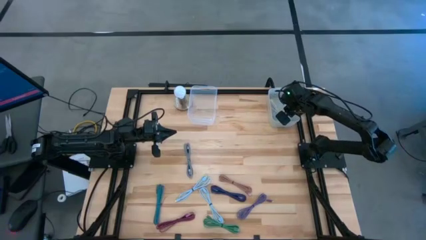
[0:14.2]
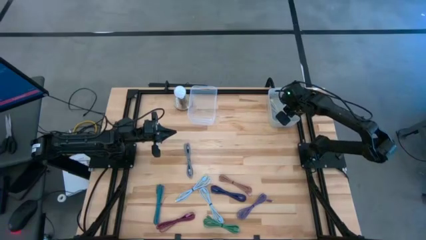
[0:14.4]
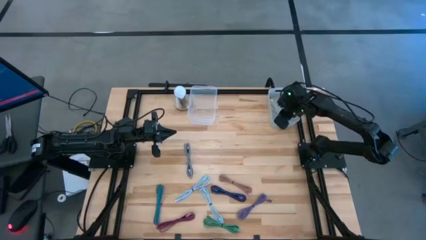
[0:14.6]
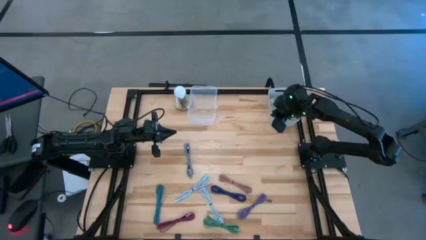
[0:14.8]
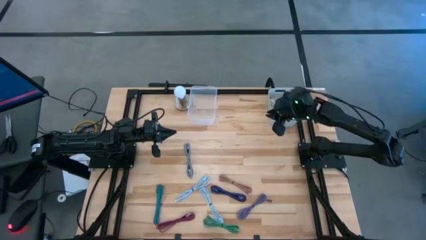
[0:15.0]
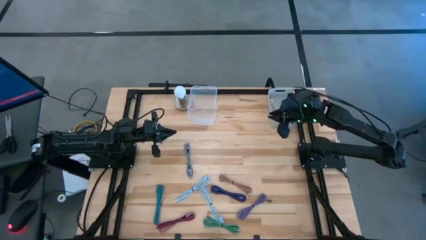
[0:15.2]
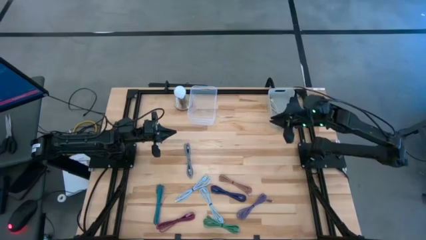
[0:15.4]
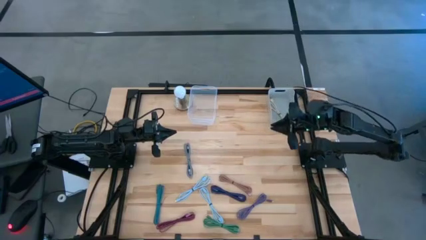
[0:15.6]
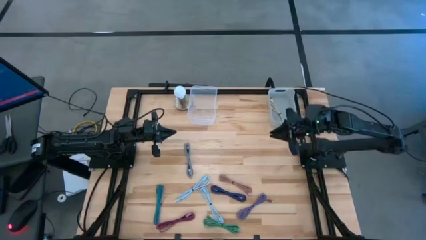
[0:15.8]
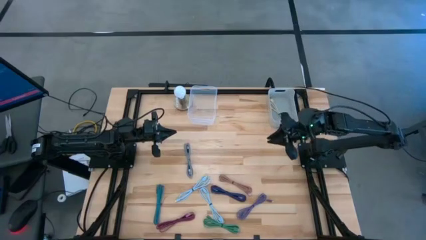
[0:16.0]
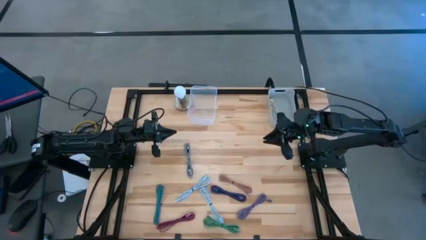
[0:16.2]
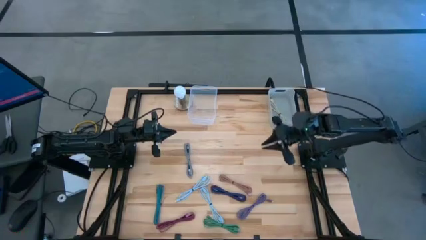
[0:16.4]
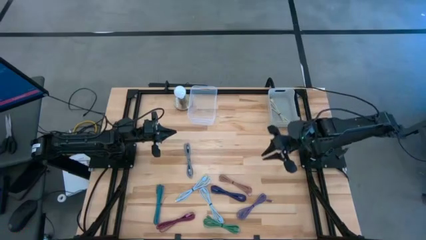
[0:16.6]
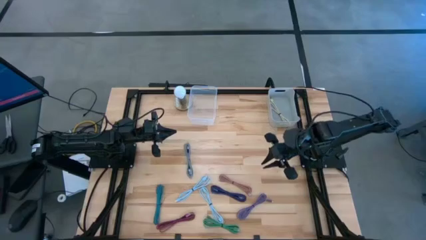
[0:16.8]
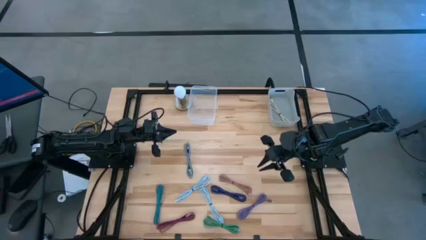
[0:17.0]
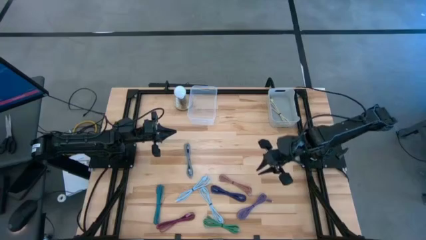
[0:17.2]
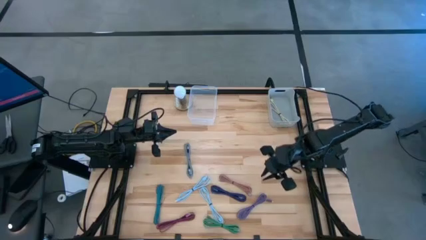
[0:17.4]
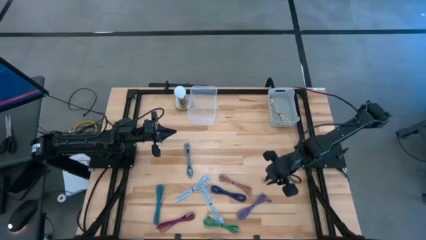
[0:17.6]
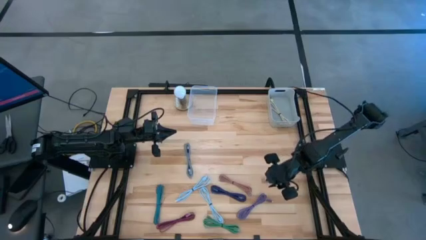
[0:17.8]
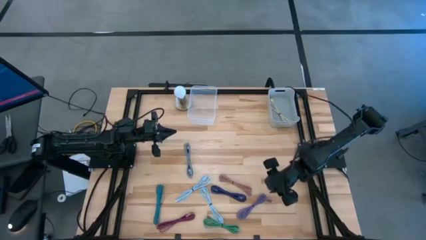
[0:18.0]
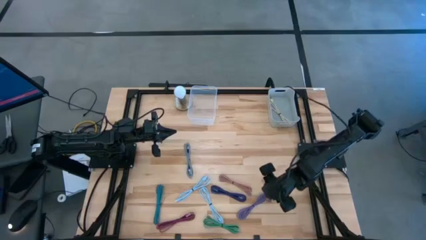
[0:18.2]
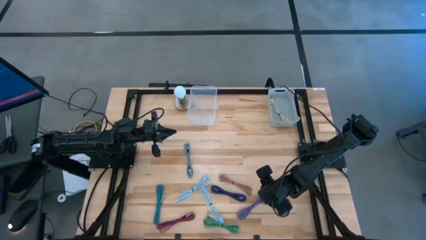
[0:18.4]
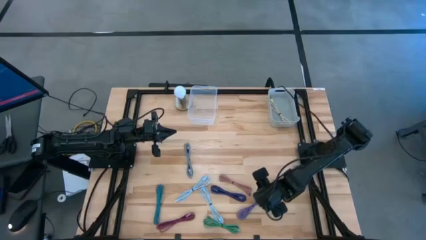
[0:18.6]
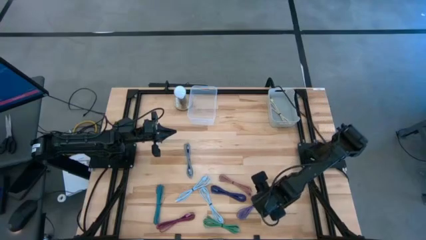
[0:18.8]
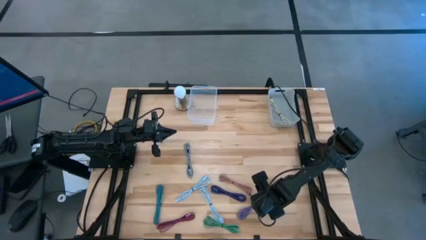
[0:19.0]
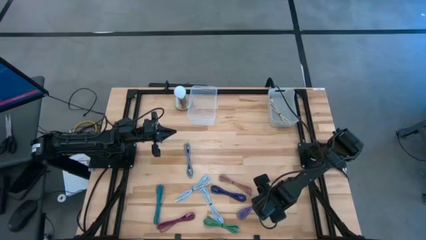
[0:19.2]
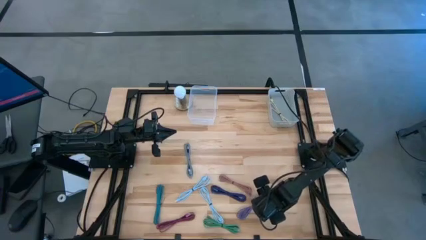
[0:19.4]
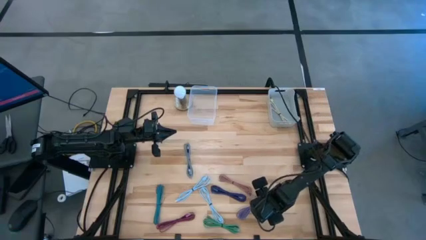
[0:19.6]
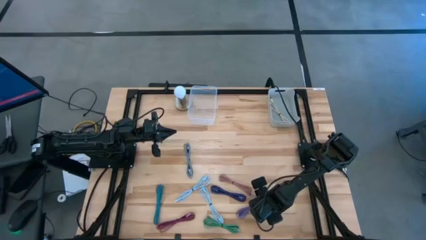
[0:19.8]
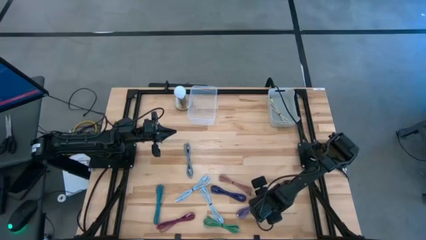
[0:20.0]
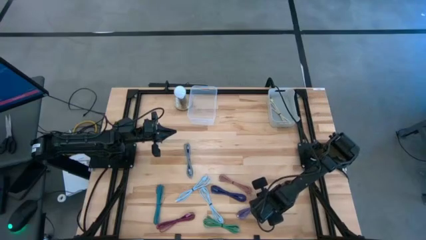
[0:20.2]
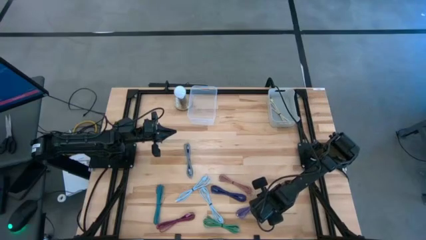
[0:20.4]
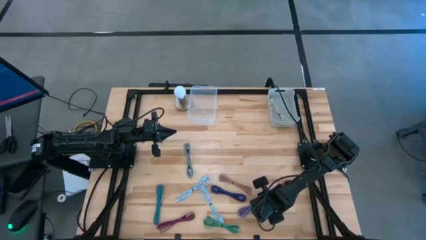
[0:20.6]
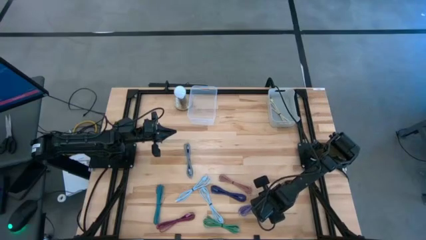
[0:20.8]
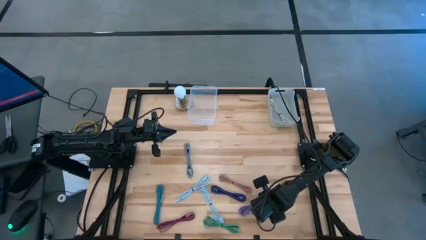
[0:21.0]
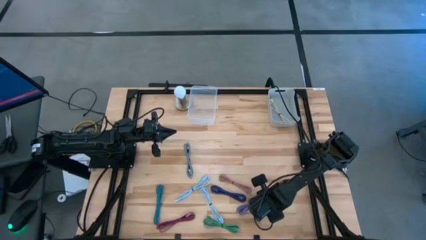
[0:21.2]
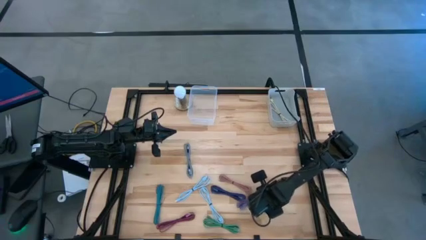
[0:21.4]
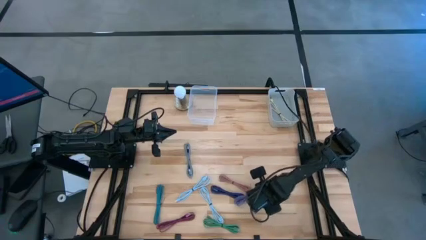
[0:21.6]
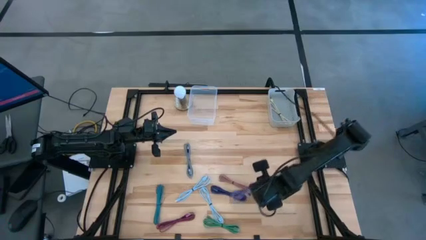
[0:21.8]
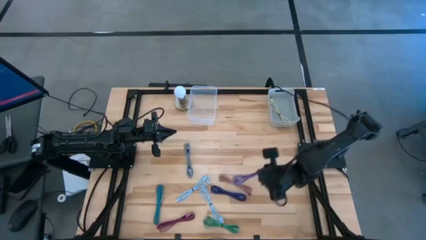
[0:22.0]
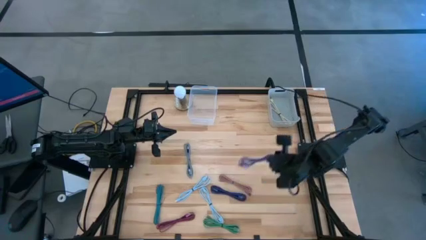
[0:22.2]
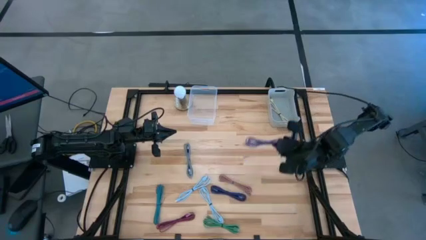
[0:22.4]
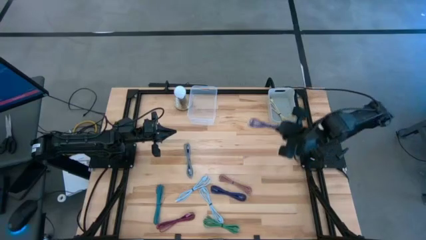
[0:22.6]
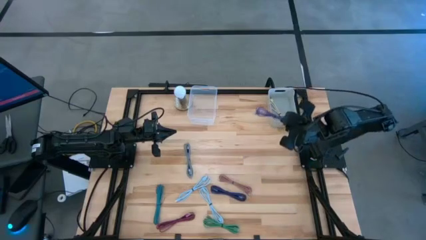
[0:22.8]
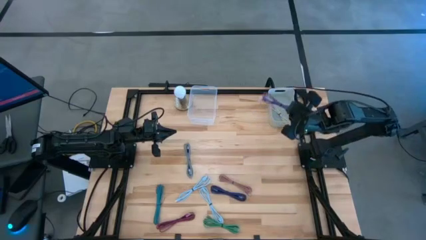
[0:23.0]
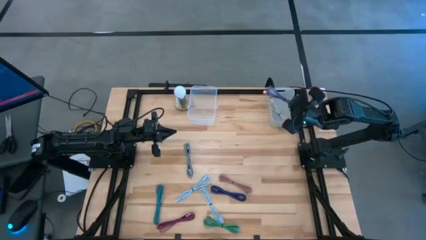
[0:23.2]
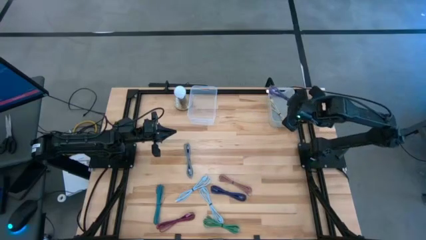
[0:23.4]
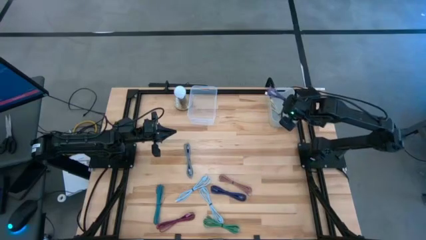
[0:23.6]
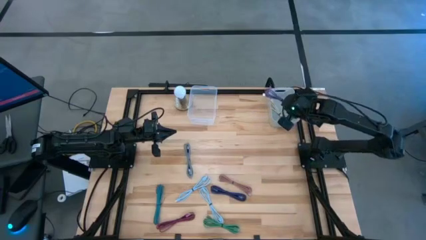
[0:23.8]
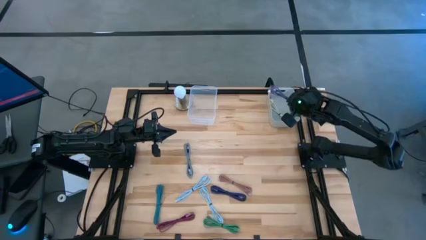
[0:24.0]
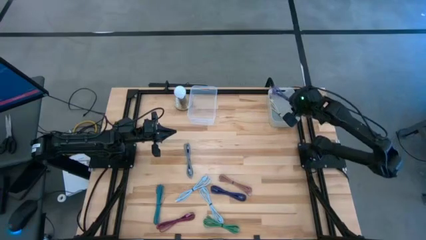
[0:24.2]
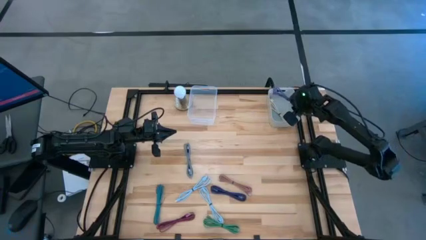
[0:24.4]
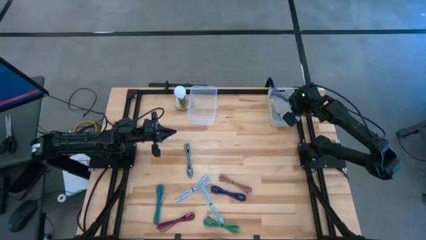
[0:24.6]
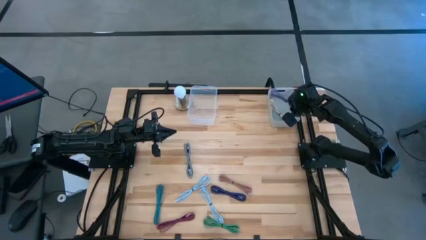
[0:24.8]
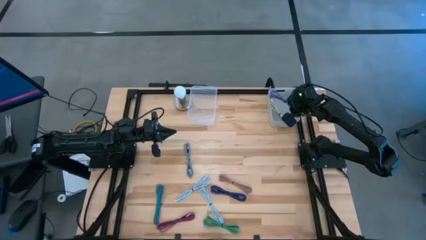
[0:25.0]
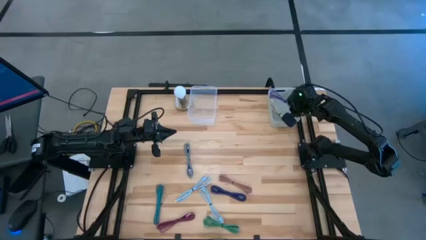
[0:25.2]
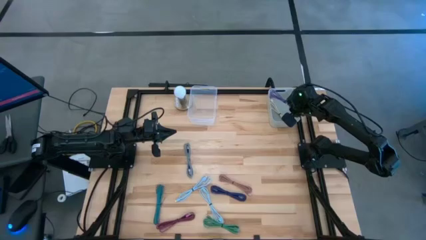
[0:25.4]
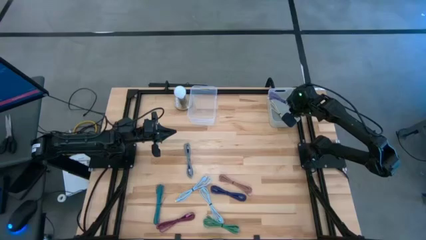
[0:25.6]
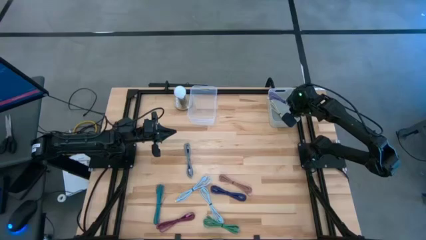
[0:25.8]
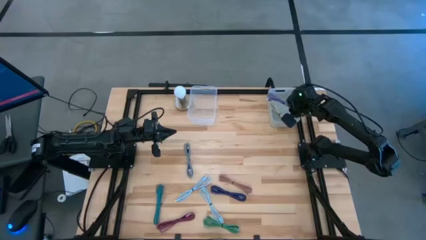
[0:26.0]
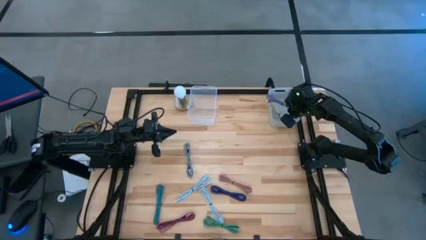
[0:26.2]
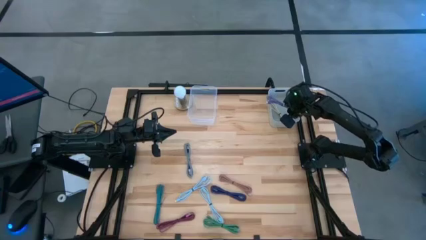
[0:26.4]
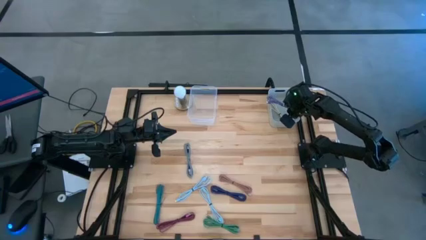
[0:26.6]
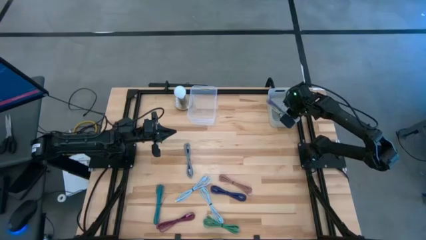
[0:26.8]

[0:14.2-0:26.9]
Task: Pick & Place USB Port
Put the purple charger cable into the white bin

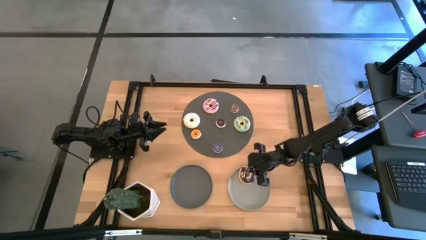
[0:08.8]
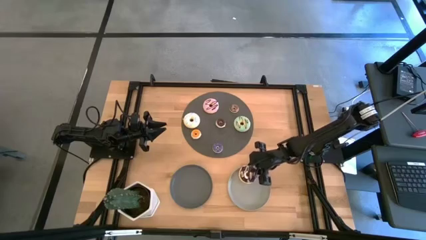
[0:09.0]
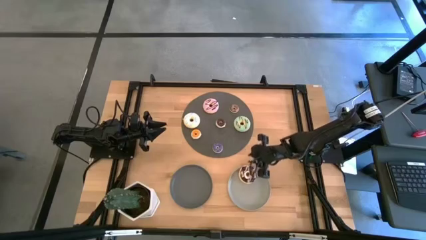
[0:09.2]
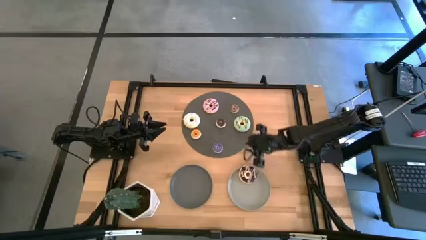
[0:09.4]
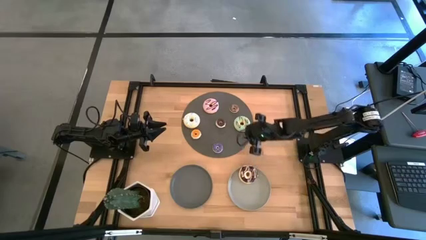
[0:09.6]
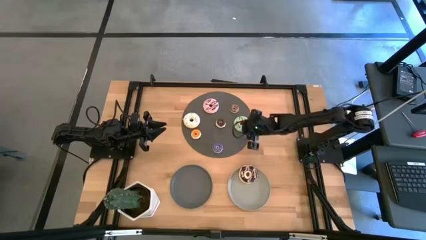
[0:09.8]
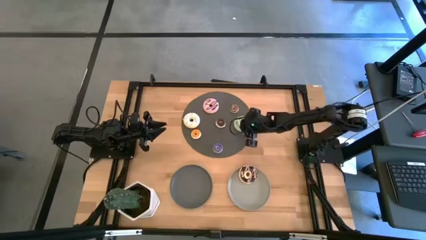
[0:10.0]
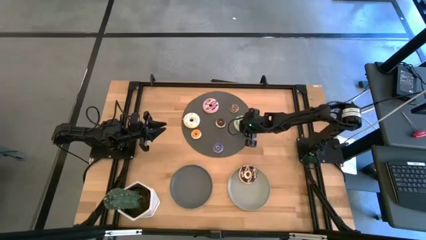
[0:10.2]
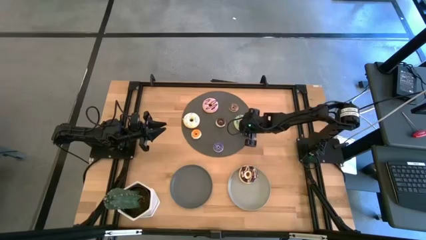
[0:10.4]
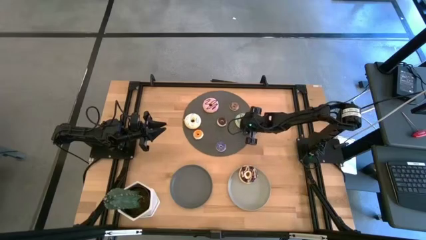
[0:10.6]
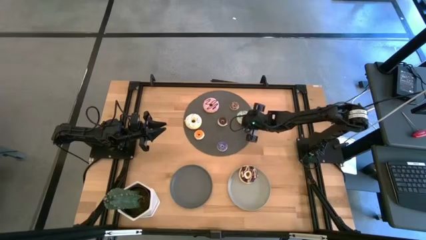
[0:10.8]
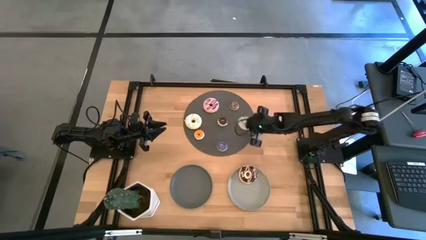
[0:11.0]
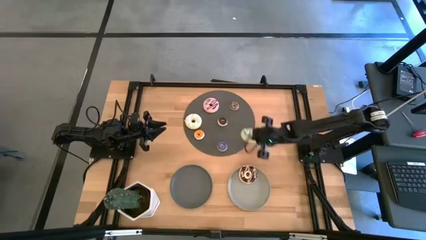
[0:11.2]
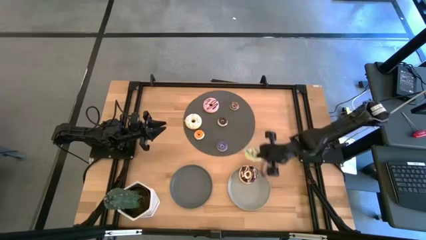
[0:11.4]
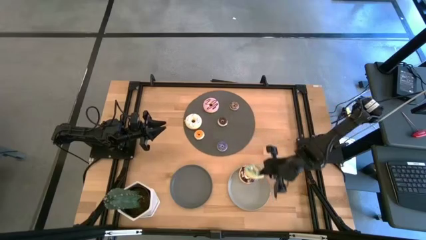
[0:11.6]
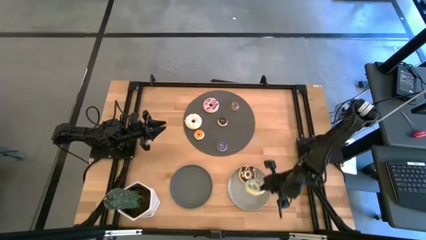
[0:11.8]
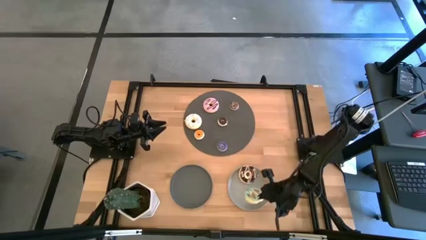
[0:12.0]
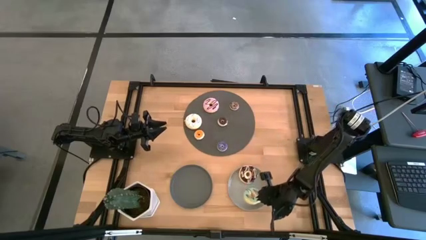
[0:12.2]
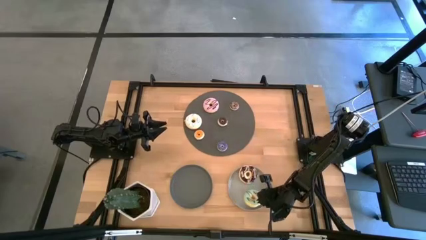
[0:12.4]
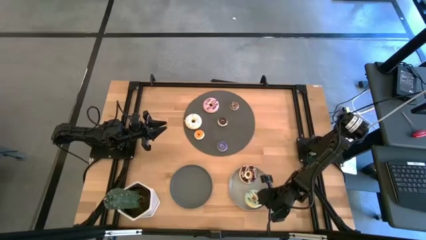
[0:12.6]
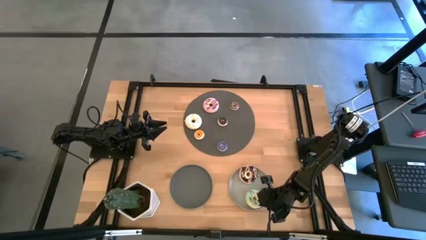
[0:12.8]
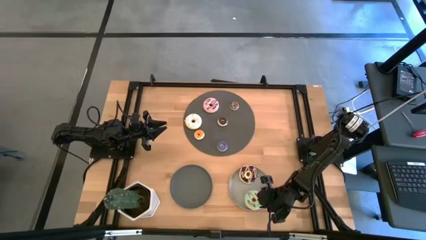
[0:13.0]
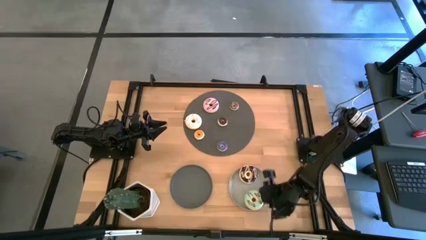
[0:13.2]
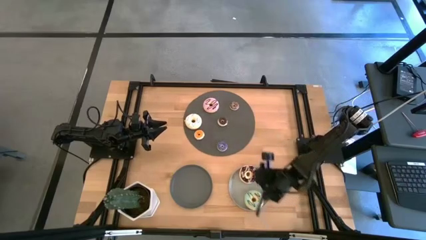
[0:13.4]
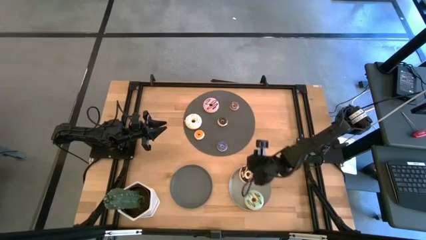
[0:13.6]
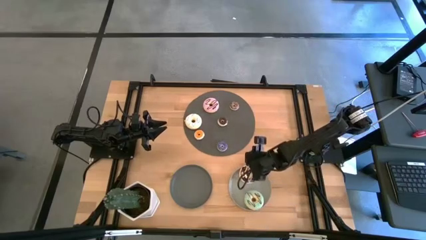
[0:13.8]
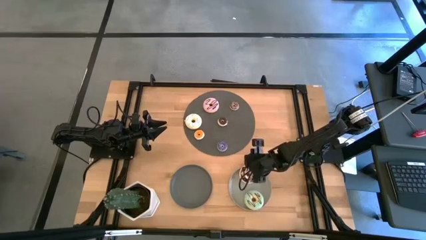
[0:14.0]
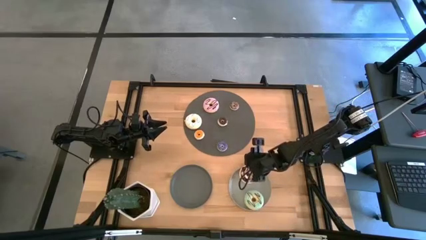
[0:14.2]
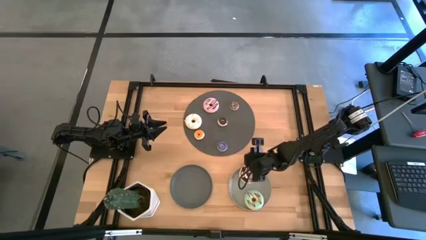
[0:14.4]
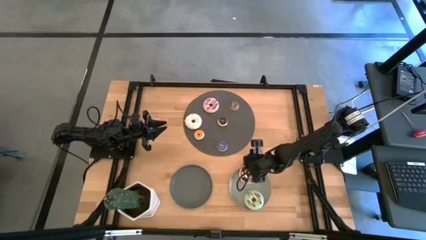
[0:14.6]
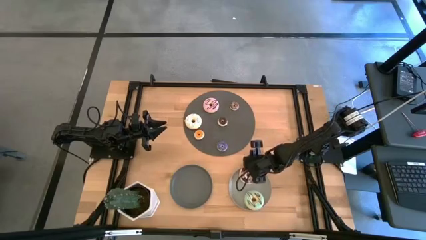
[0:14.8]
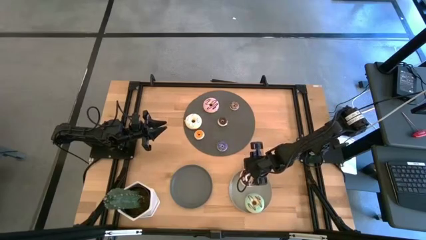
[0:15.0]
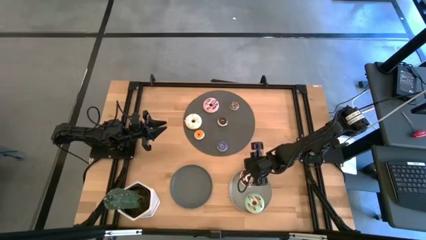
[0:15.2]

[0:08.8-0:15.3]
Task: Pick & Place donuts
Put large green donut on the gray plate
